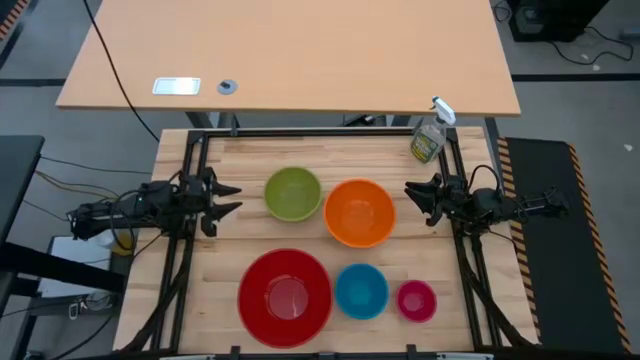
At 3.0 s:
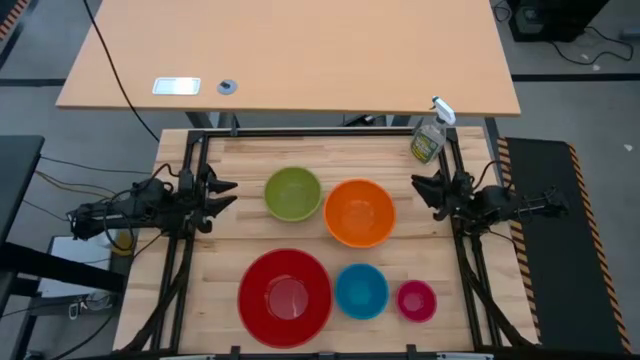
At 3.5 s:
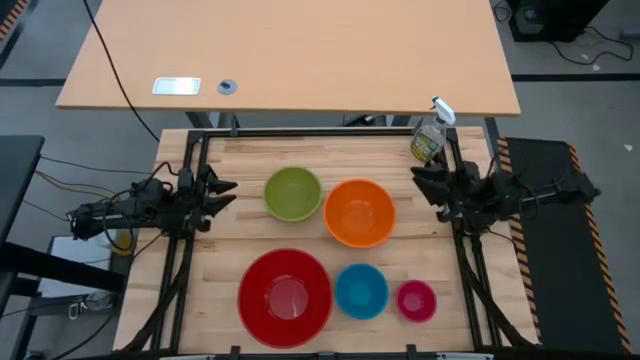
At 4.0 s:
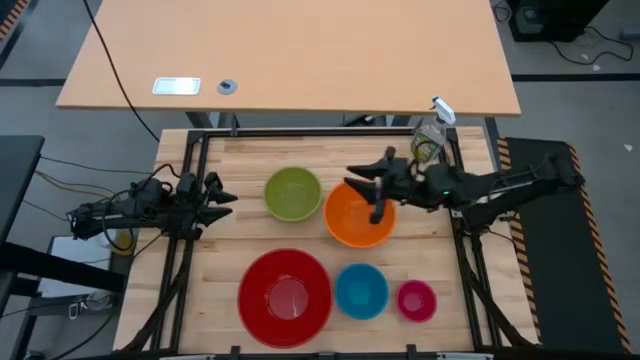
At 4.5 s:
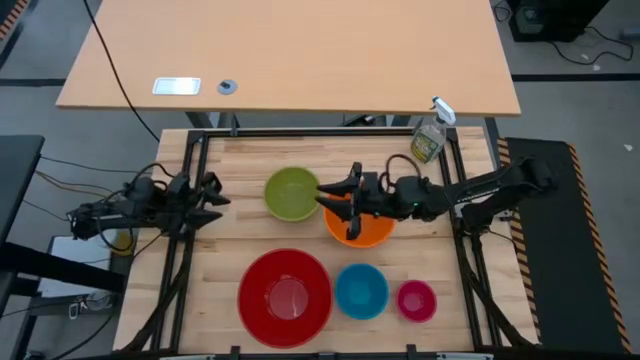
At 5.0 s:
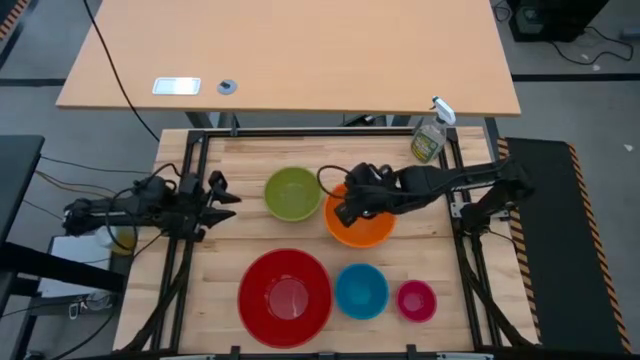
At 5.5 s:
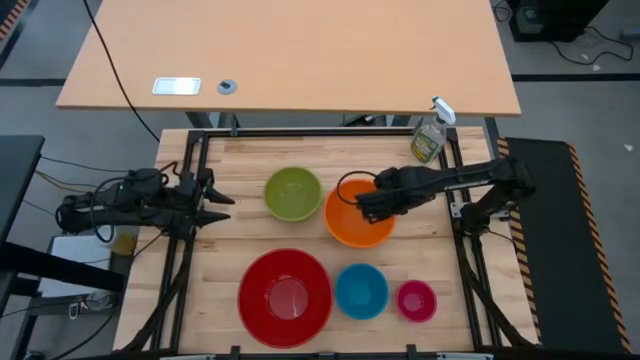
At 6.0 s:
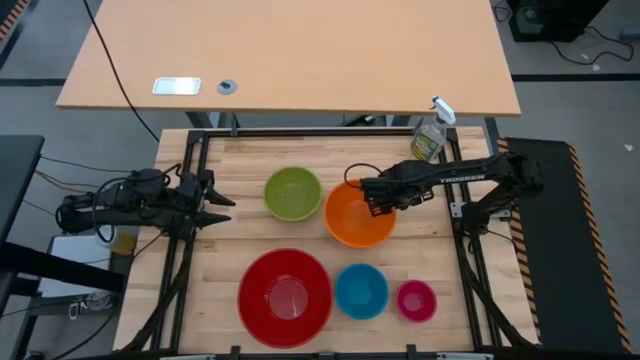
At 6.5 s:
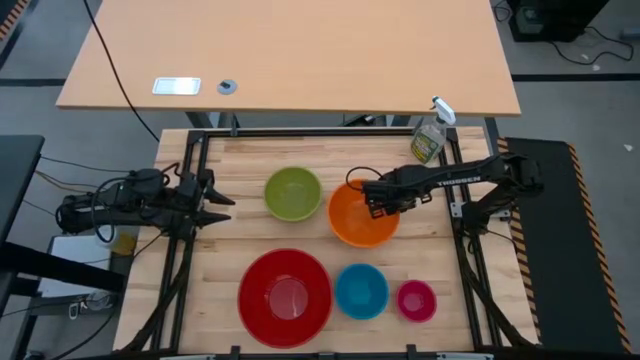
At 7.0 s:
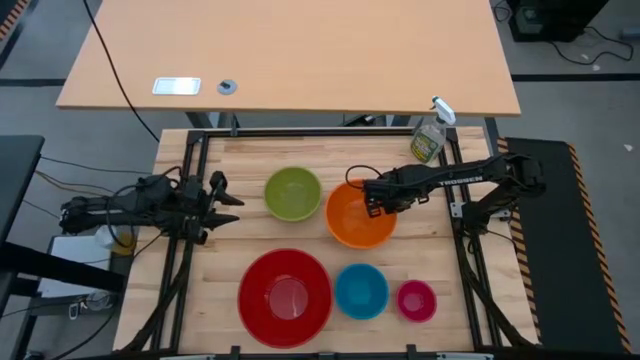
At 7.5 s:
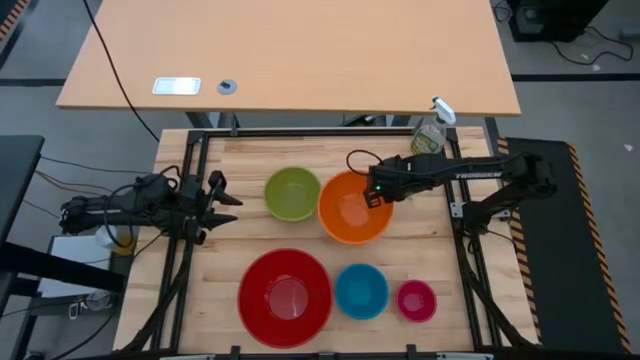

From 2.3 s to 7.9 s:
Stack the orange bowl on top of the large red bowl

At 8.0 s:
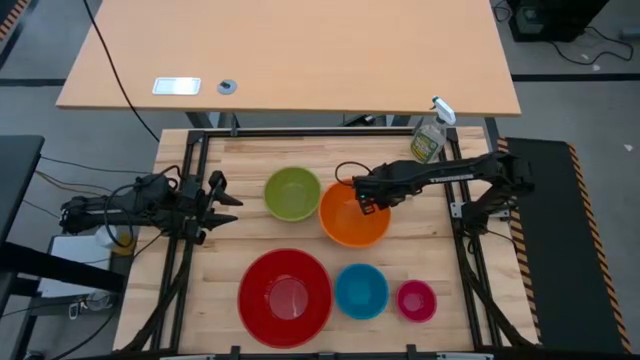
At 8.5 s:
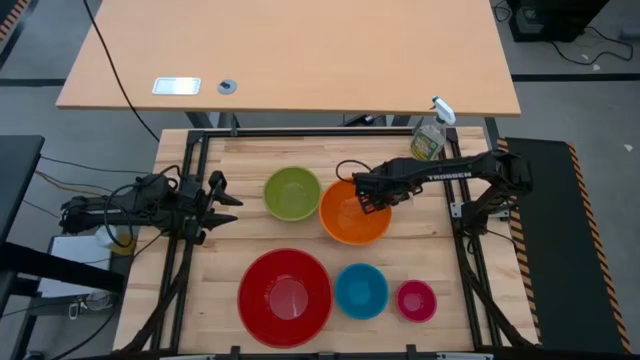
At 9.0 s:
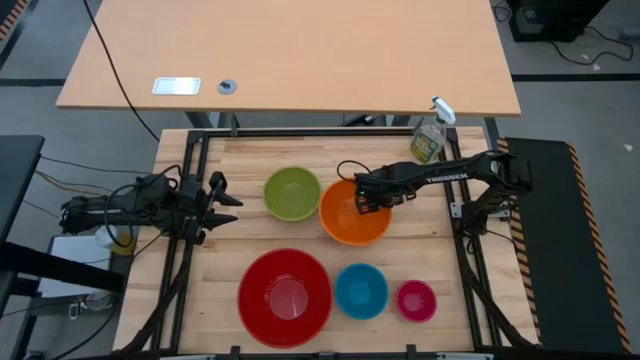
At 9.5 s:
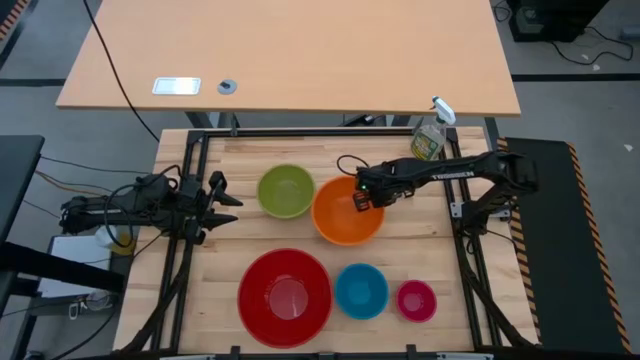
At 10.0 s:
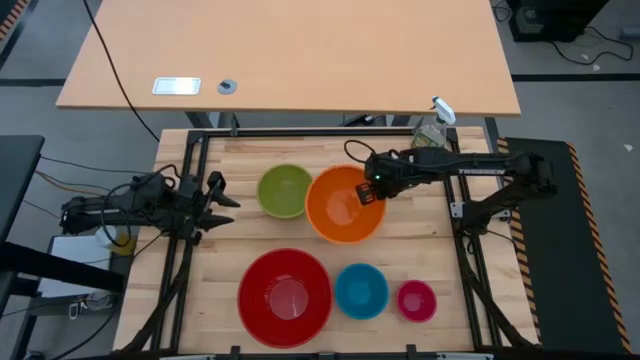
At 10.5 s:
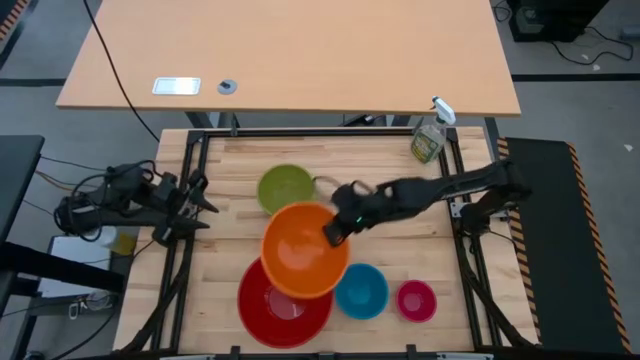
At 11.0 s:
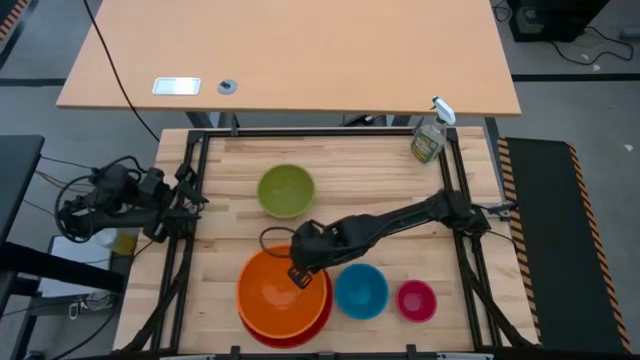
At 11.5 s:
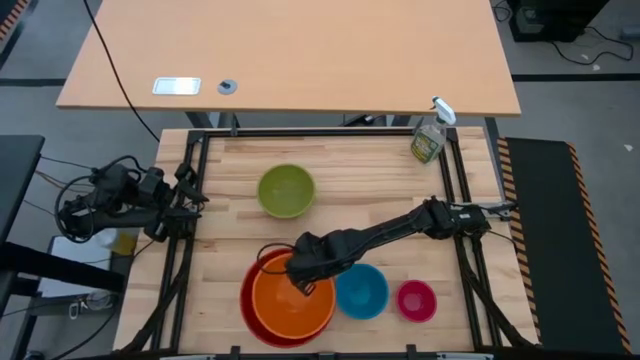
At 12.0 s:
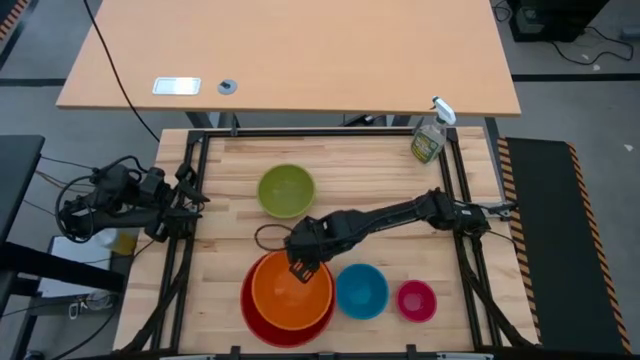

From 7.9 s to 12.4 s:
Stack the orange bowl on top of the large red bowl

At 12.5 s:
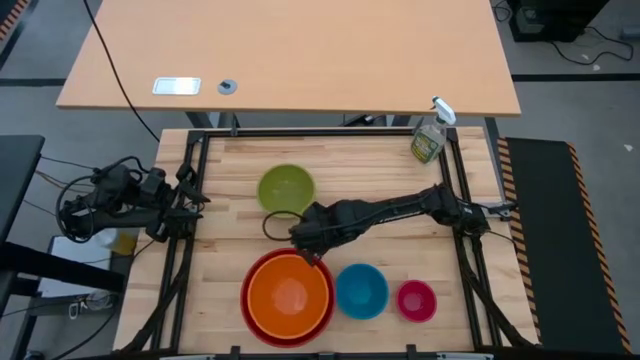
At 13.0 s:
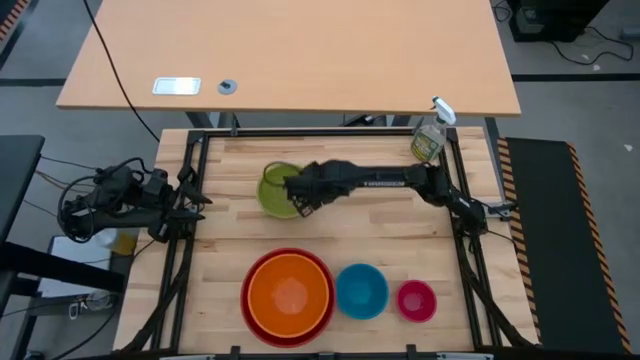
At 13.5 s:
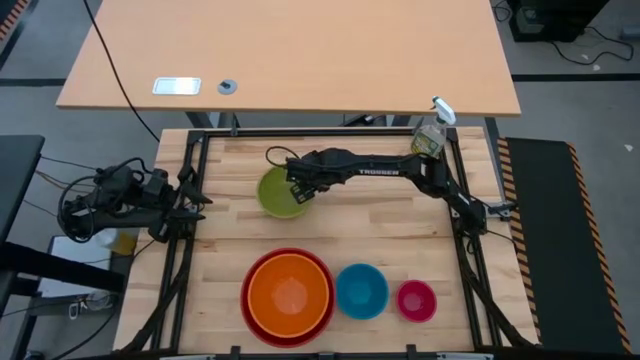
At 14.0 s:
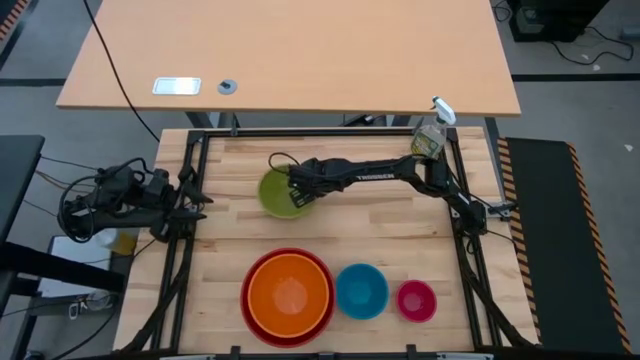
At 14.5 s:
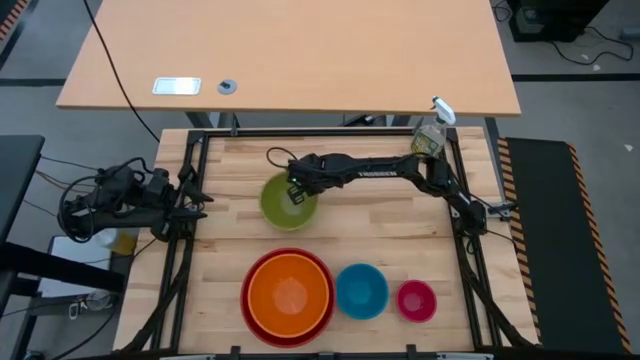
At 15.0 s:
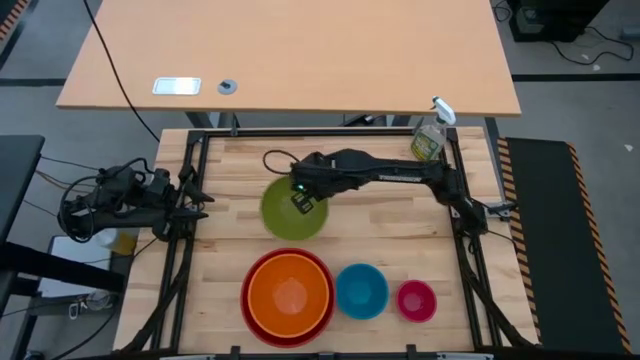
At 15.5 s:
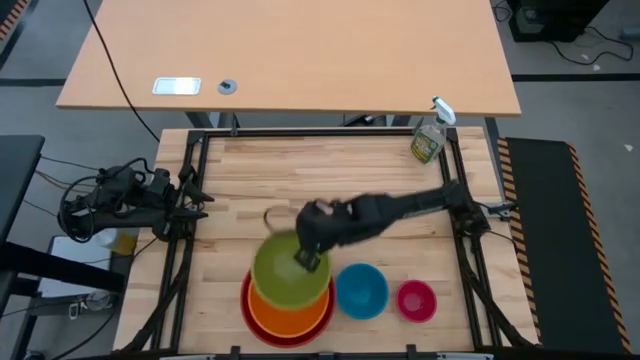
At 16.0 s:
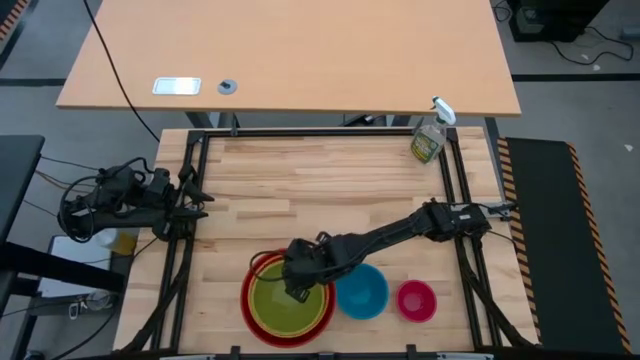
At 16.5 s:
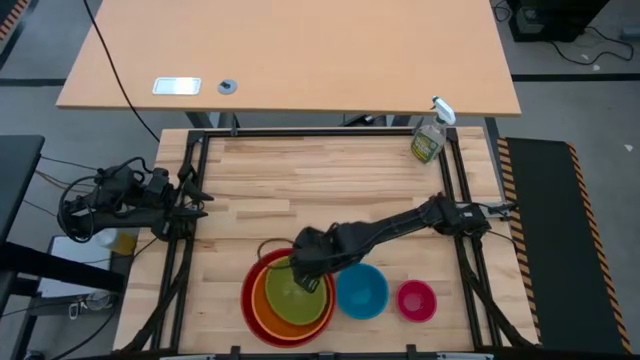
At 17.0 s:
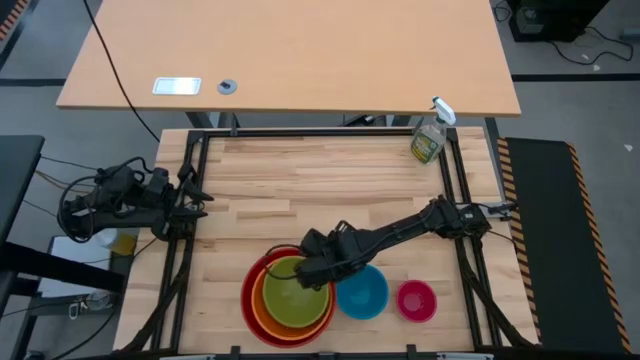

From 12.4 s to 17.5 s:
Stack the green bowl on top of the orange bowl

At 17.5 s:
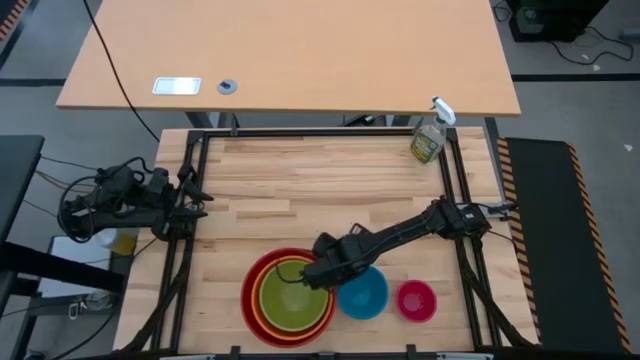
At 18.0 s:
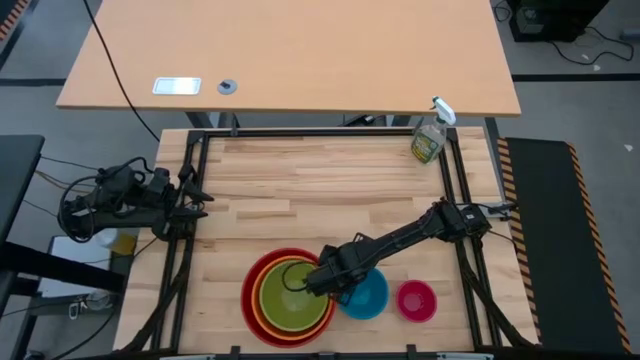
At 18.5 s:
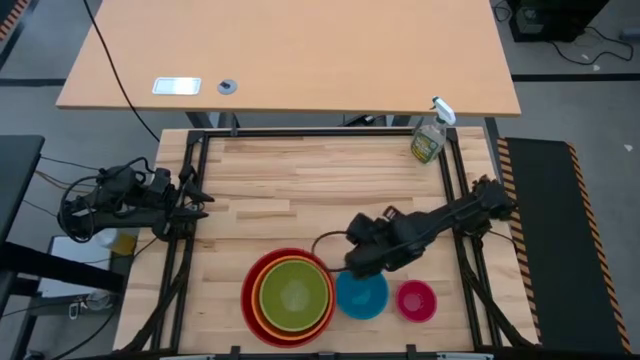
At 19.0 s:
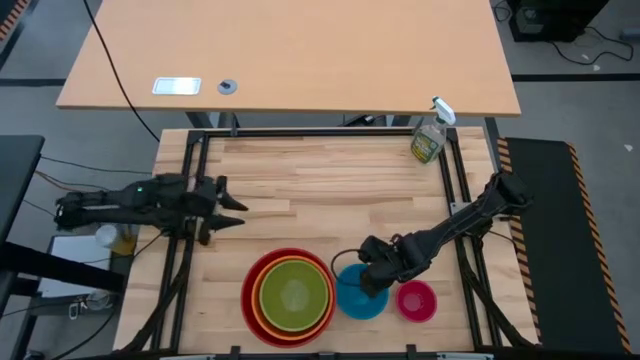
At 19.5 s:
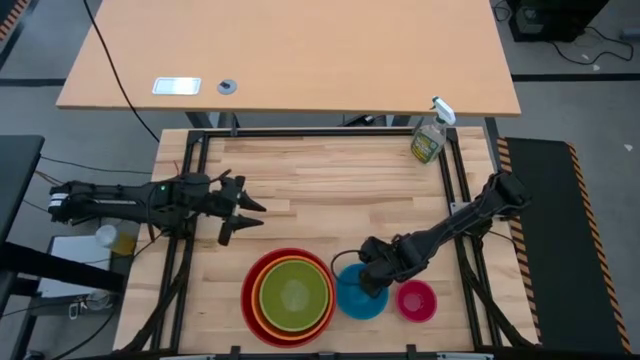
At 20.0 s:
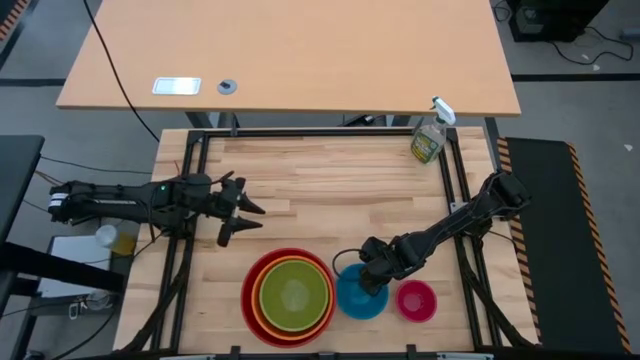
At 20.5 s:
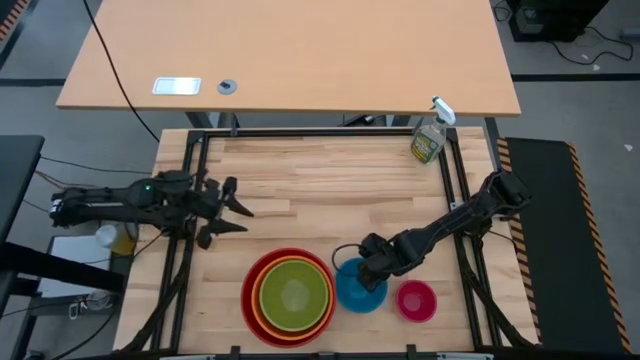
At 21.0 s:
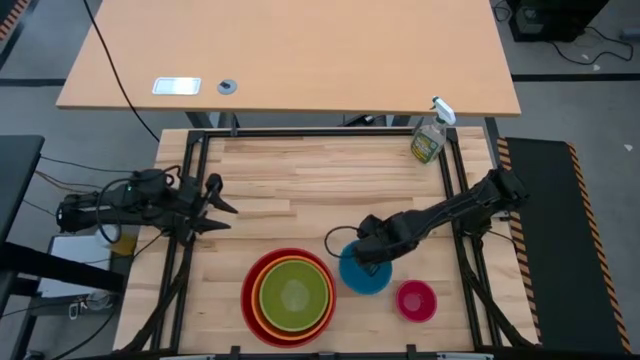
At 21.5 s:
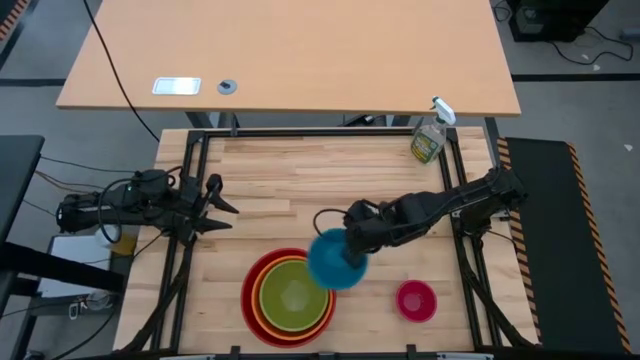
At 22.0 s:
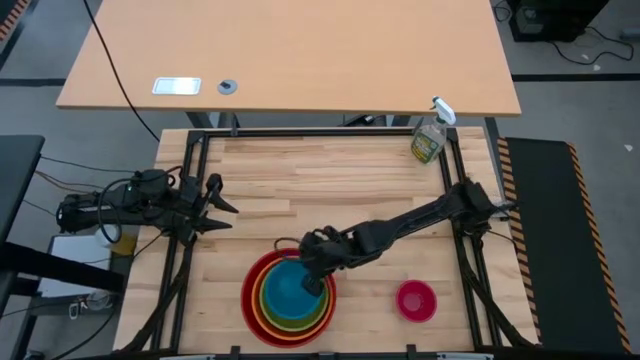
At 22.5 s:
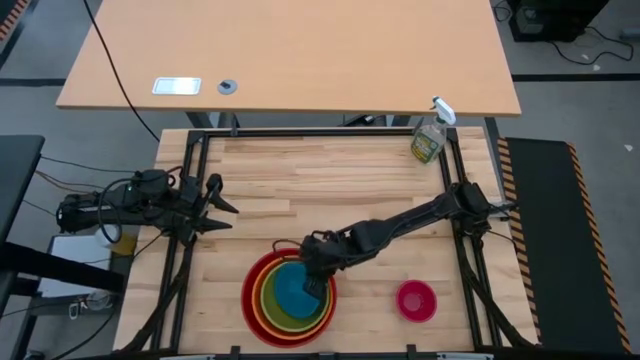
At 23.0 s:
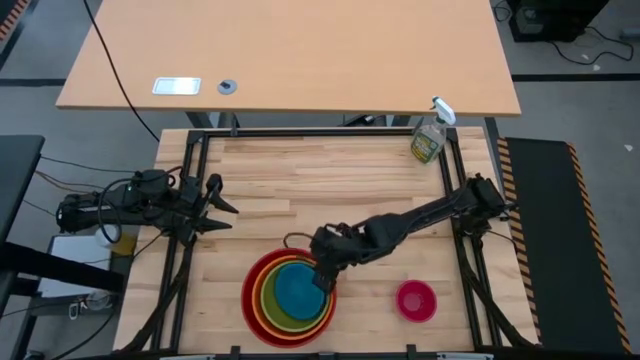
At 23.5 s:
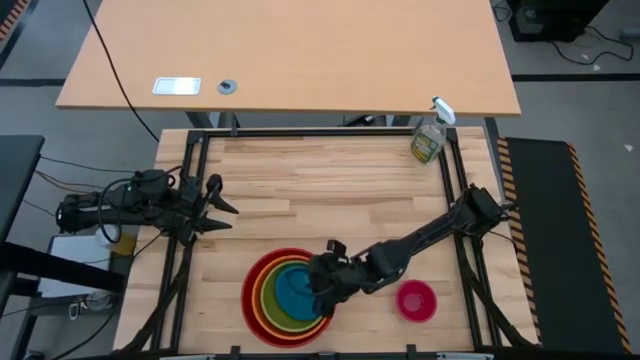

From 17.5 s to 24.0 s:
Stack the blue bowl on top of the green bowl
